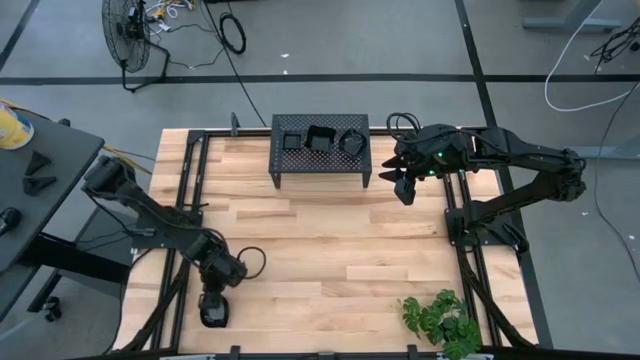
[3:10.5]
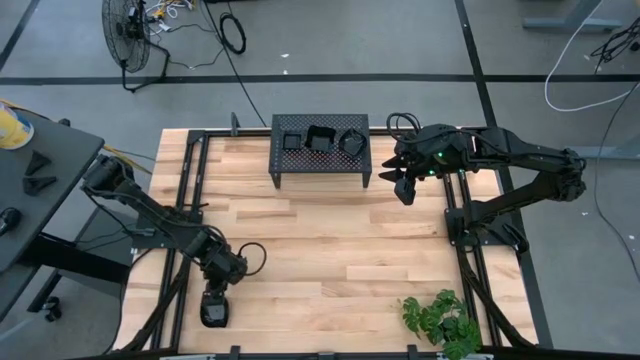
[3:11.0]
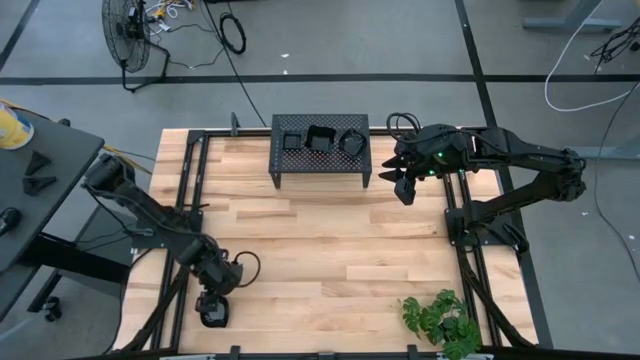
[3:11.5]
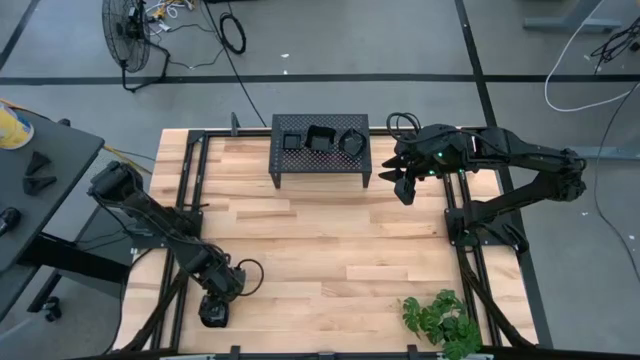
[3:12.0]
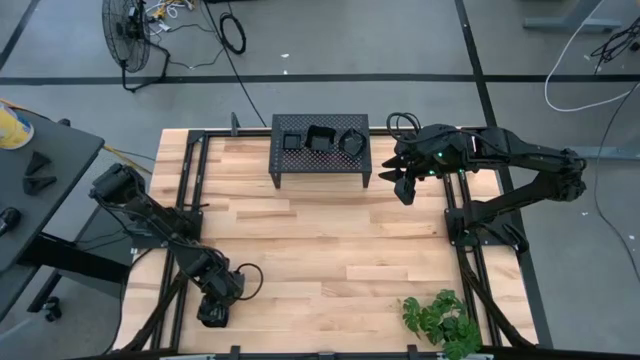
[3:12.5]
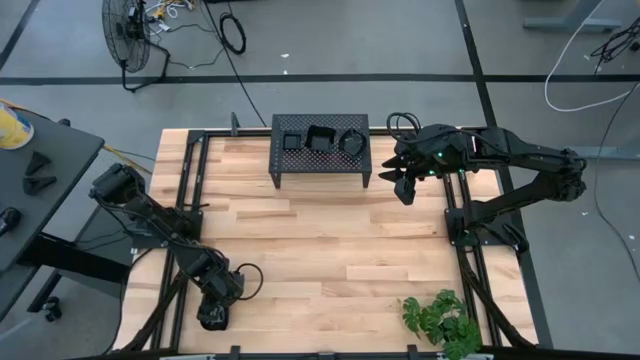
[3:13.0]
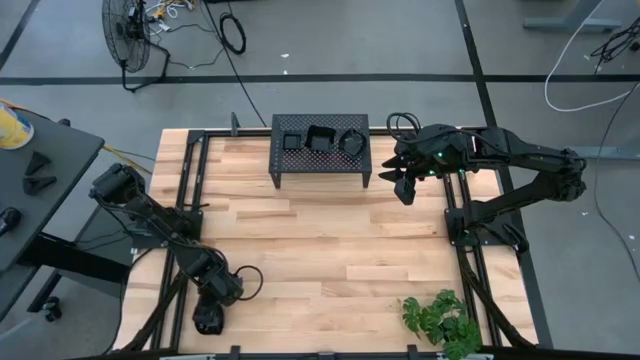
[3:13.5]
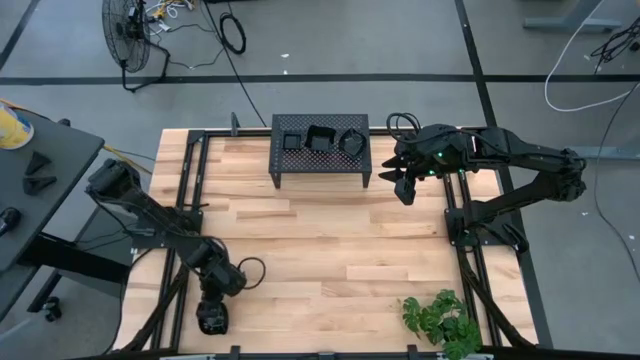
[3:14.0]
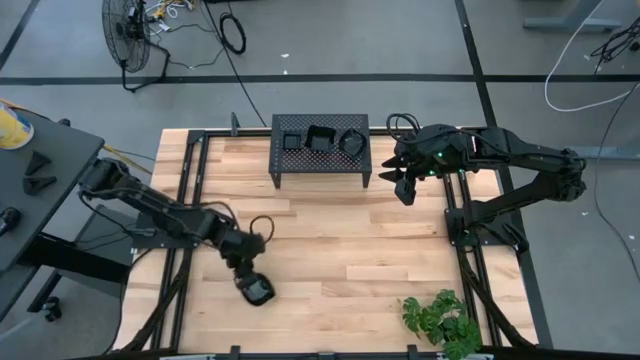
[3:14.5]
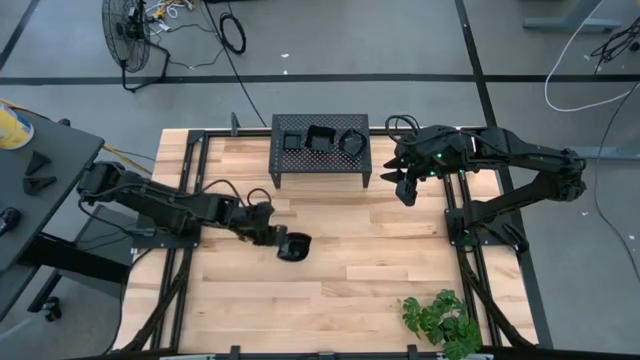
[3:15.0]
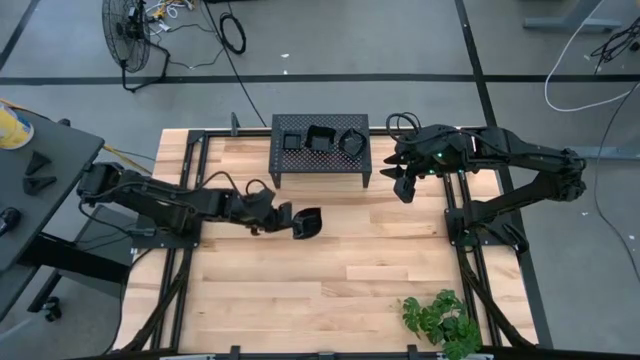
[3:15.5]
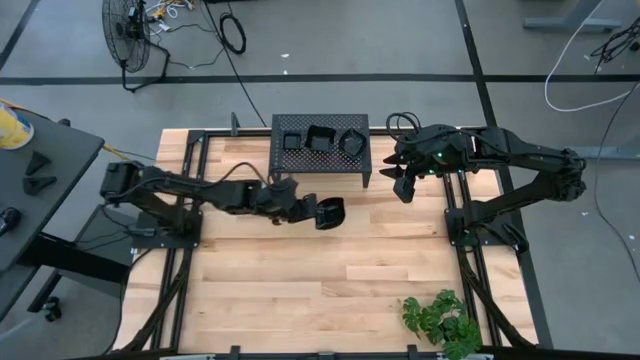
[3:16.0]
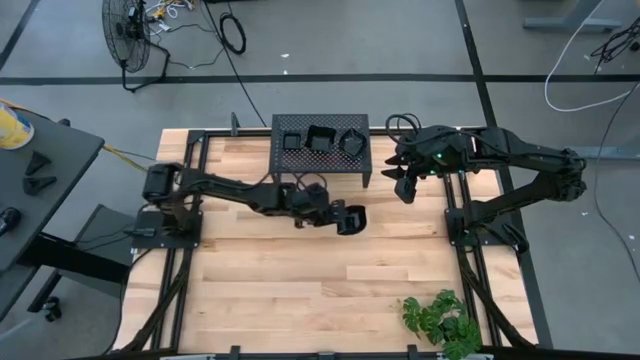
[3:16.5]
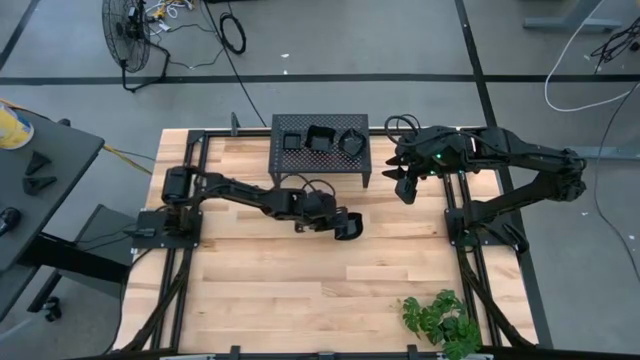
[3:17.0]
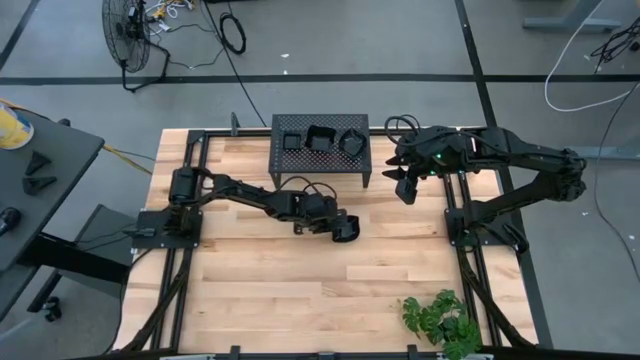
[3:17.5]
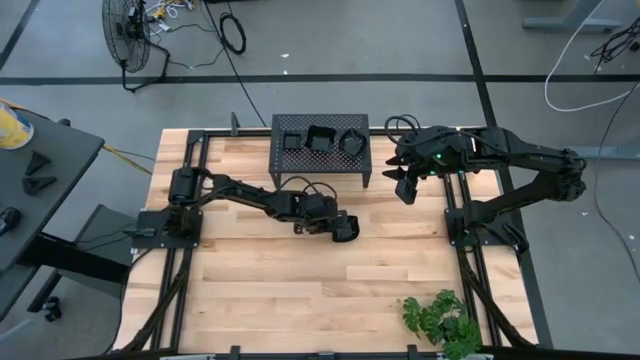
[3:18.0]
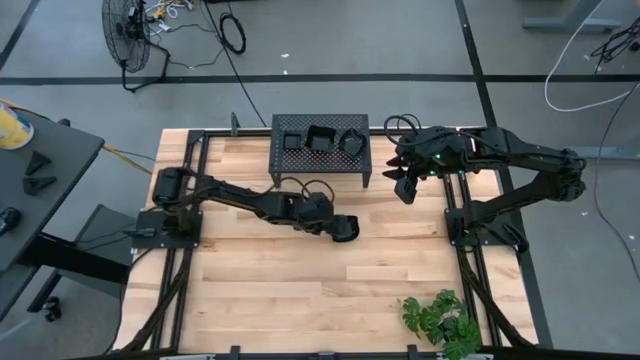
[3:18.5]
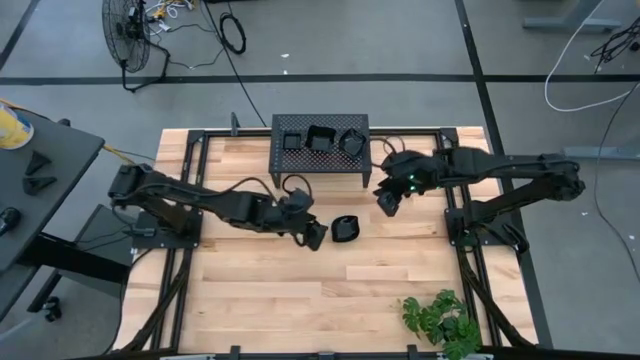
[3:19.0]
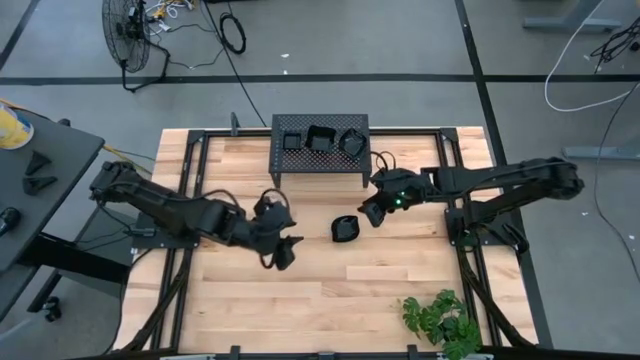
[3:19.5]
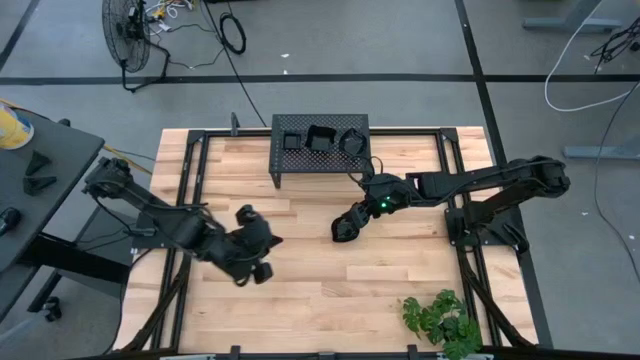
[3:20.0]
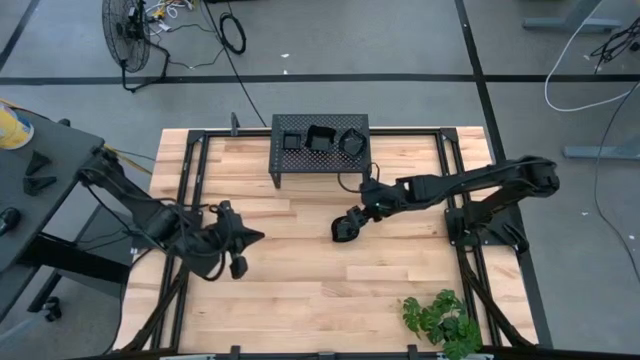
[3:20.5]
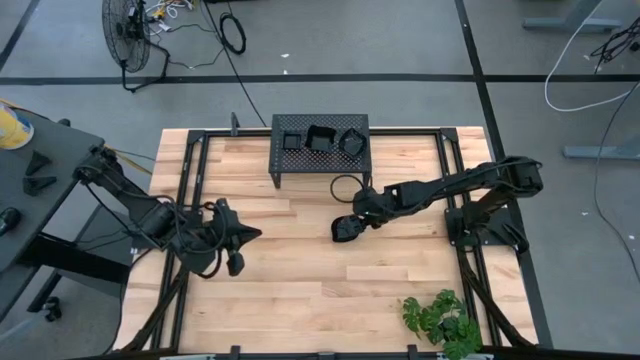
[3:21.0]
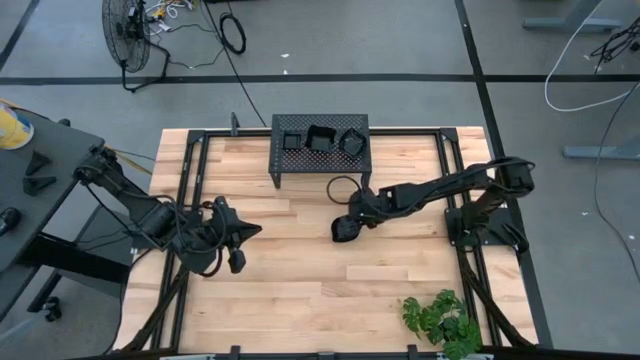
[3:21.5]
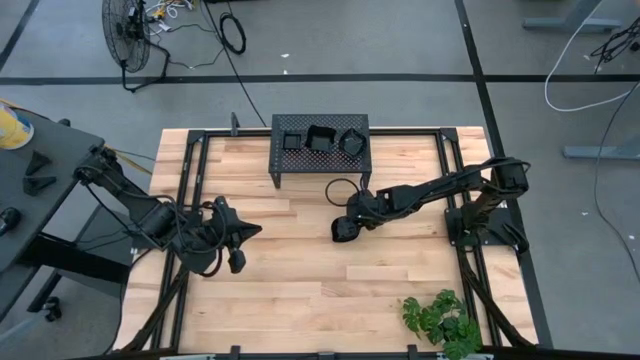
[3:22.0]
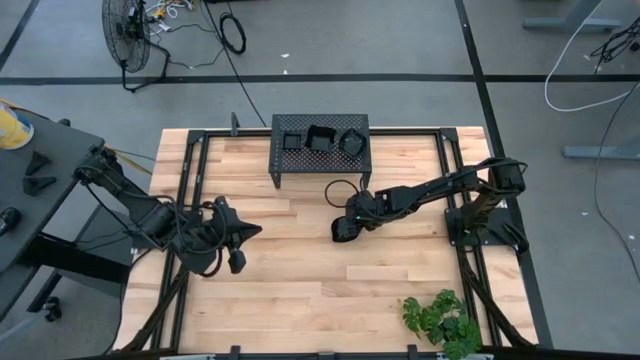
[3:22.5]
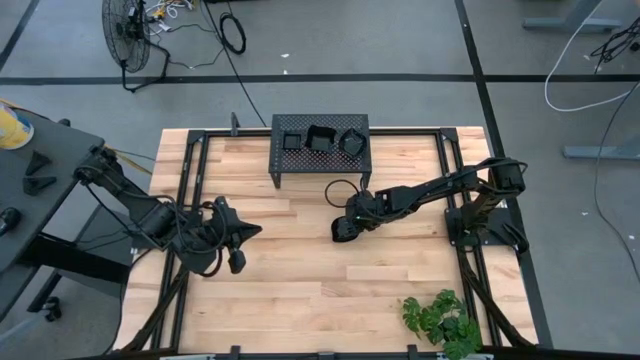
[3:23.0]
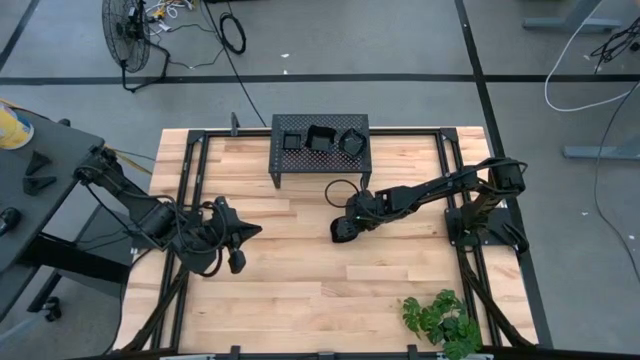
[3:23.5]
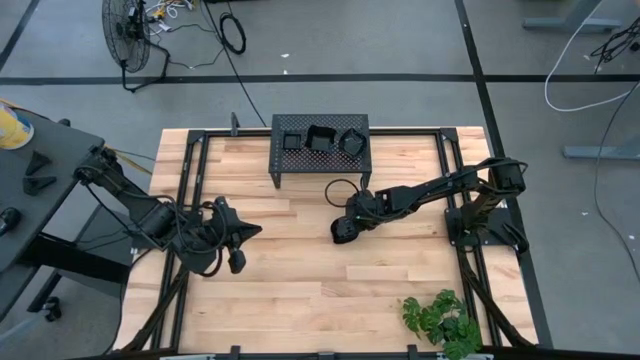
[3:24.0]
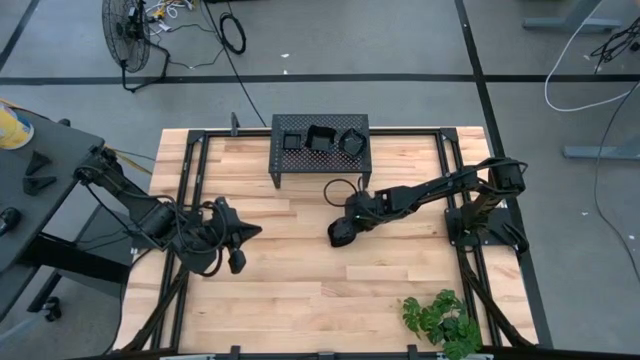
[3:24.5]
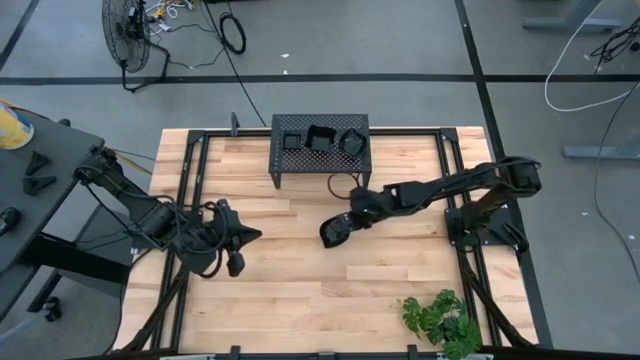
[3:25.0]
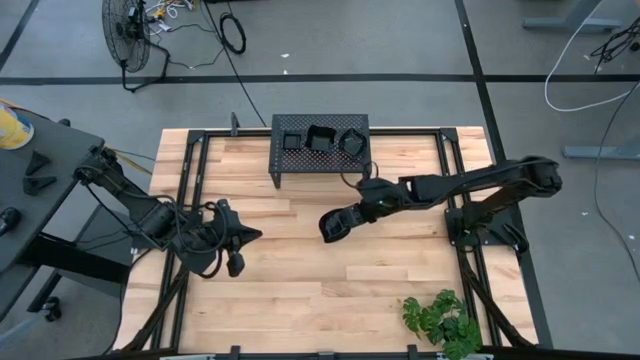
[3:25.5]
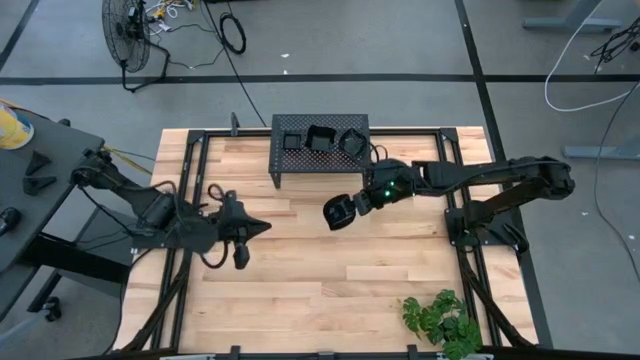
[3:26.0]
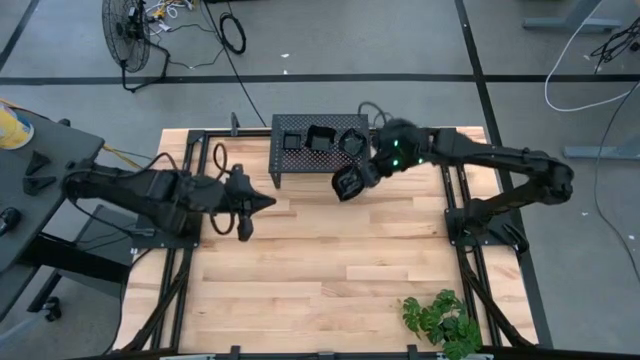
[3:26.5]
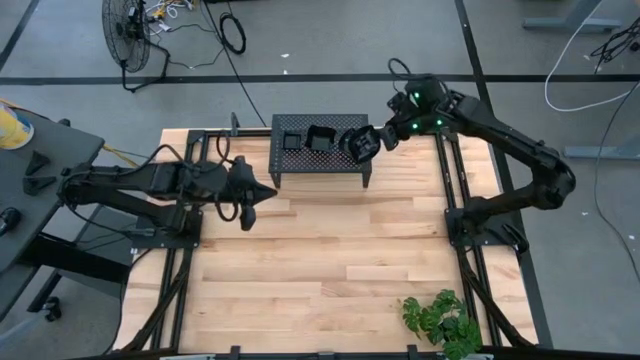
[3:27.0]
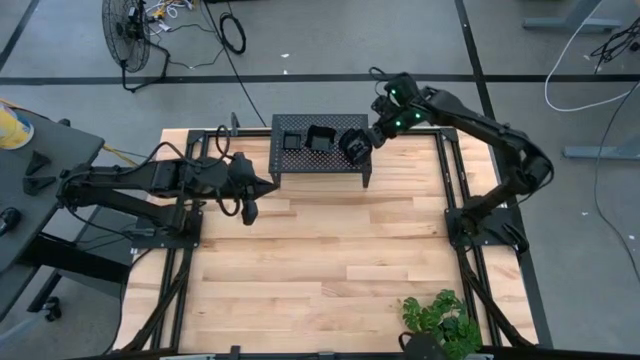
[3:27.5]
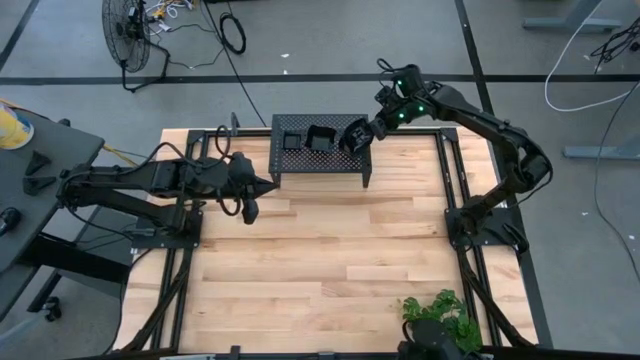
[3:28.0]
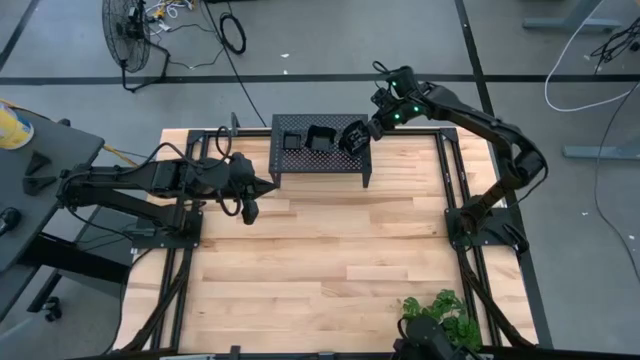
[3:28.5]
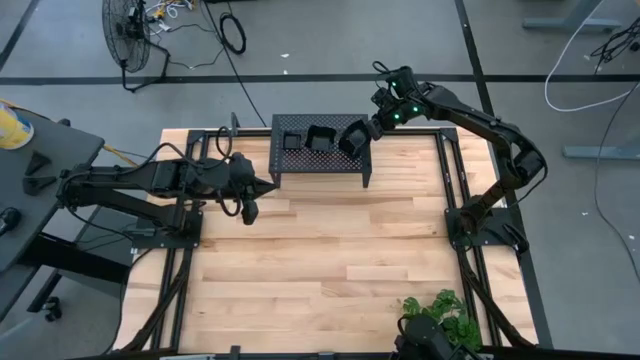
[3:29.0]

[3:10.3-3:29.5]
Task: Pick & Place Mini shaped plates
Stack the leaf shaped plate on top of the other leaf shaped plate on the shelf

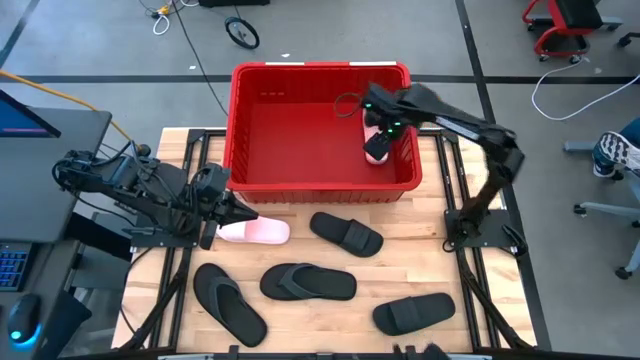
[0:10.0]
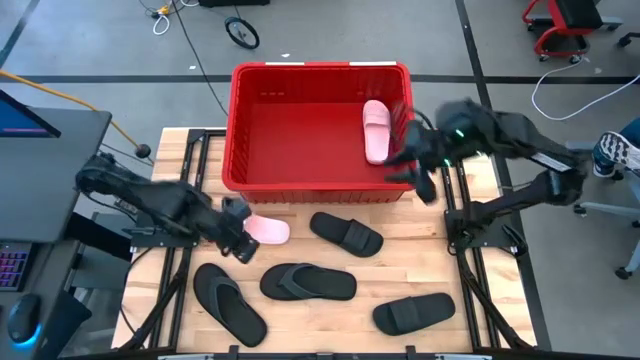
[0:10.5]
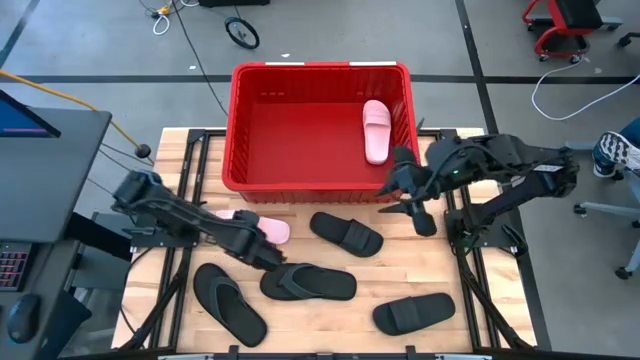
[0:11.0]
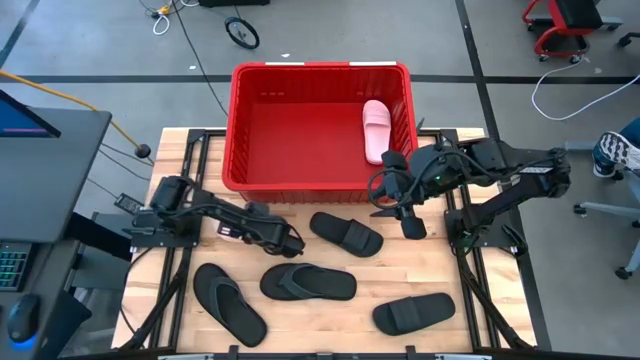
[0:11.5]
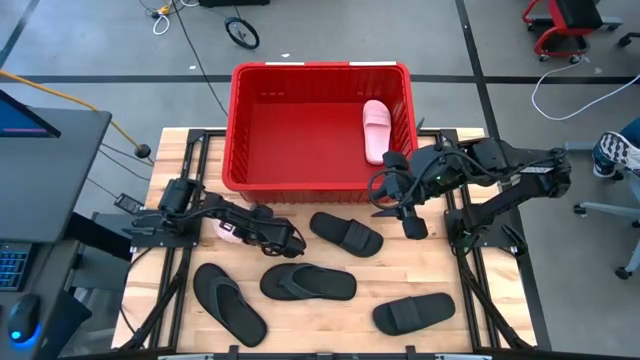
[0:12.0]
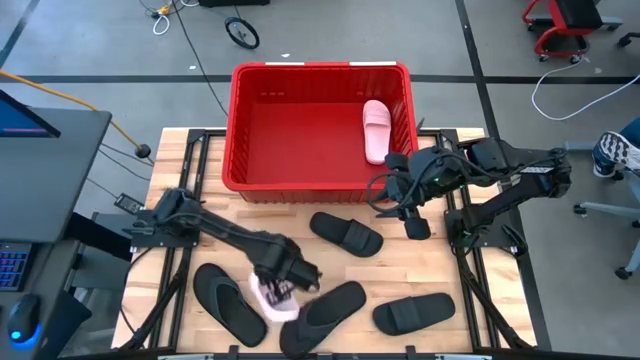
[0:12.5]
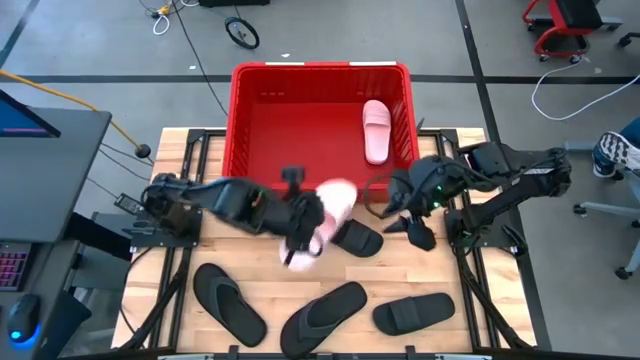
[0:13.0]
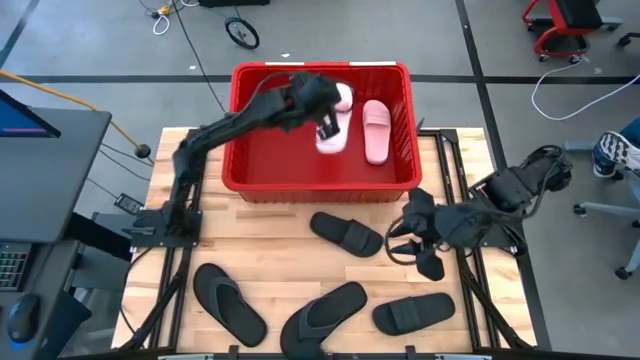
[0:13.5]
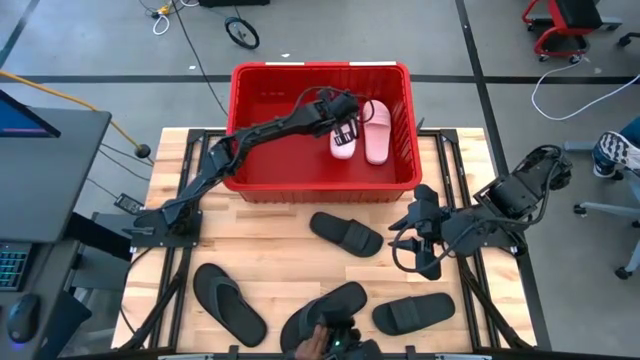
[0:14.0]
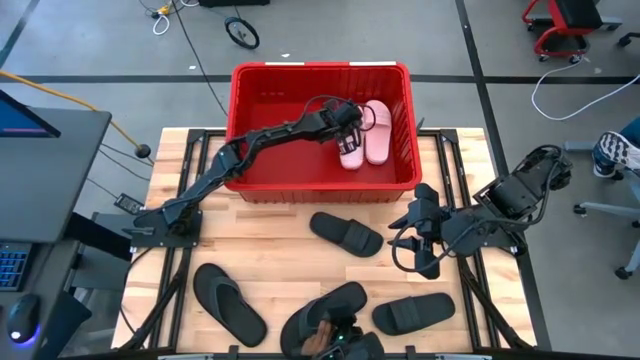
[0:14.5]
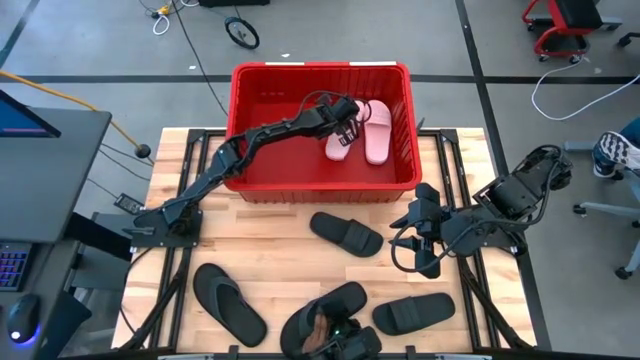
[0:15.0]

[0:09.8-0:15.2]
Task: Pick and place slides into bin
Put the pink slide into the red bin
